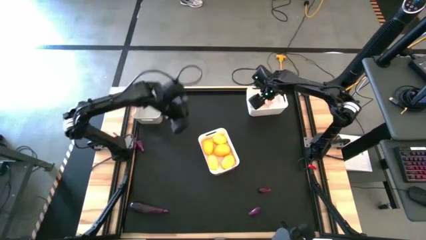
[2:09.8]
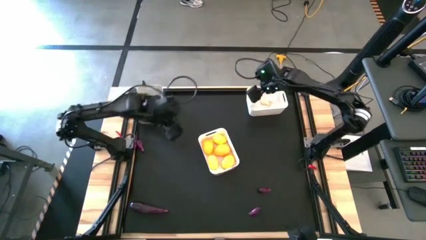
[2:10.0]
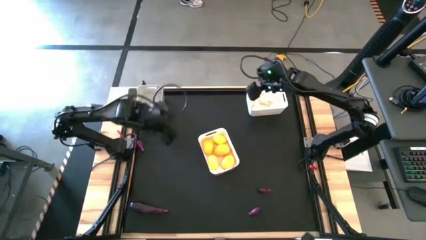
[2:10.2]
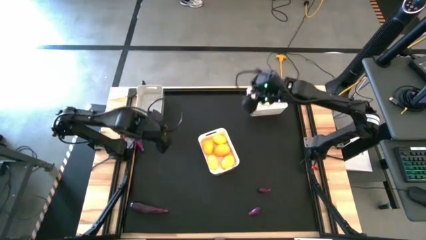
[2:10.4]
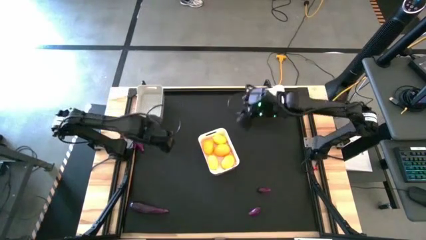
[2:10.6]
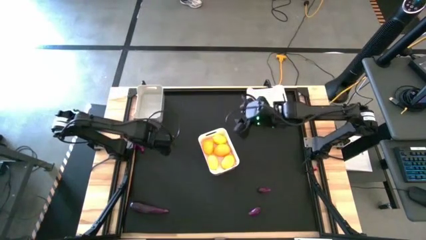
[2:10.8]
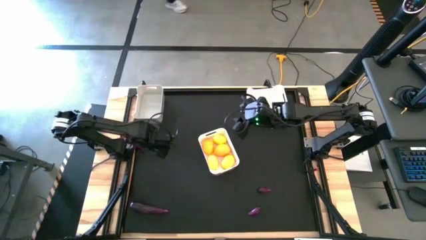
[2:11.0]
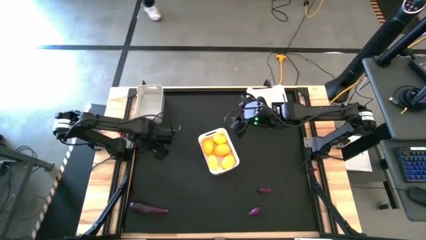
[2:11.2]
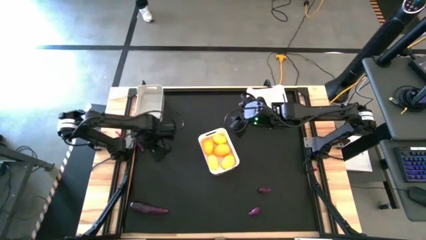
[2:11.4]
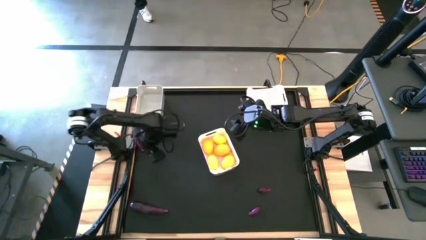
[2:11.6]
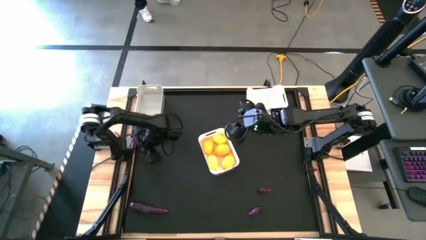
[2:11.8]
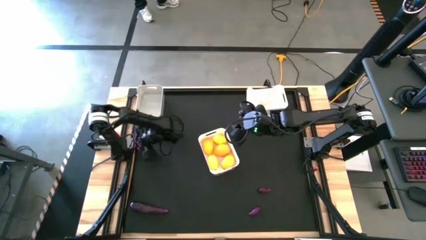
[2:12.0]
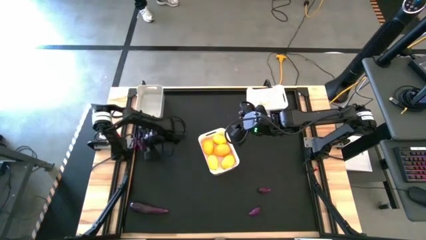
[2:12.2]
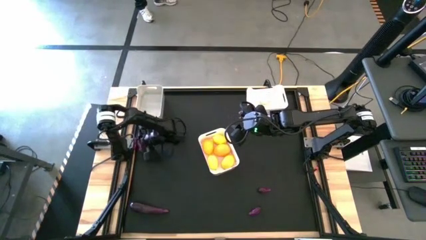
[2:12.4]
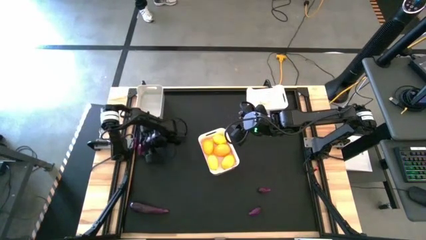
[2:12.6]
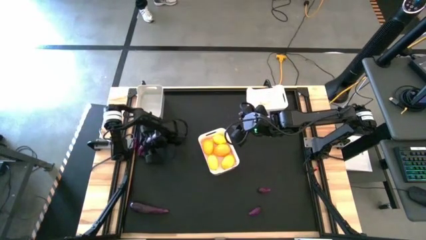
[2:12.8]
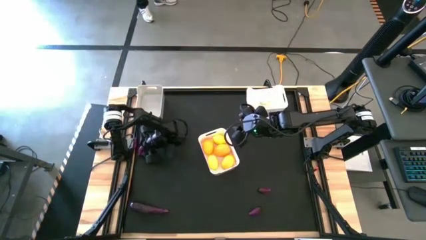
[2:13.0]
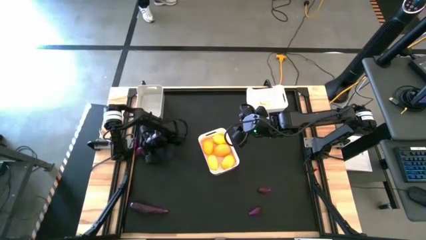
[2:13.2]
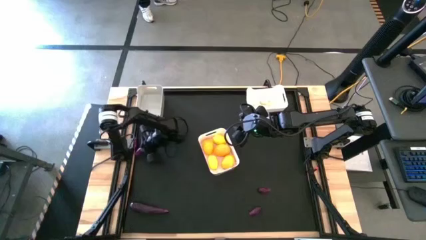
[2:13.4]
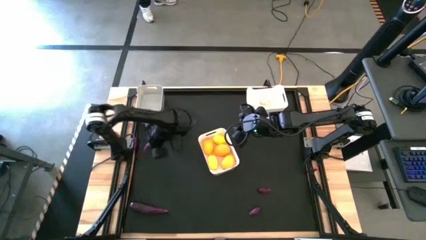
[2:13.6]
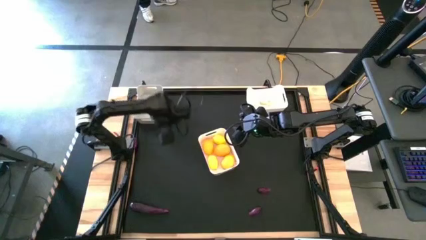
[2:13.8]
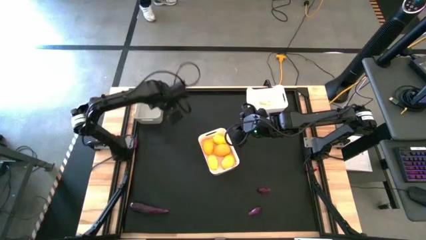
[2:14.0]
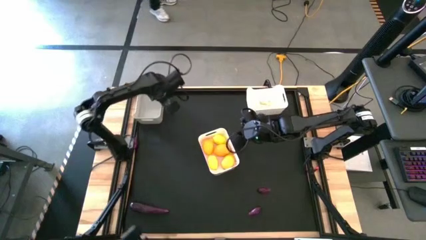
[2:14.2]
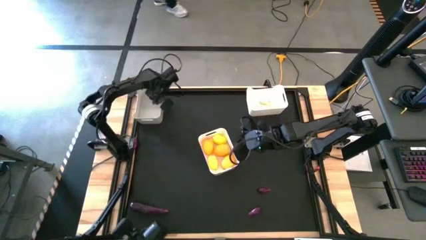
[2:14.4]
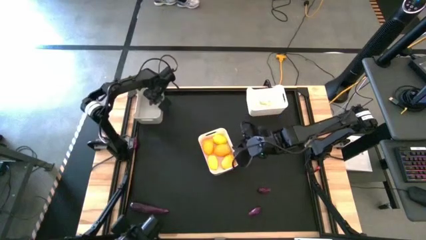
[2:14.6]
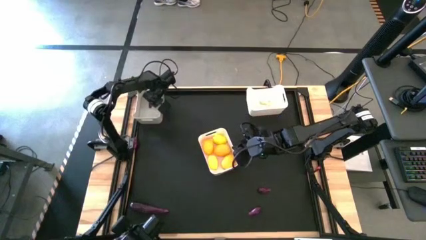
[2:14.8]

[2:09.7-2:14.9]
Task: Sort produce into baskets
Put the eggplant into the gray bin

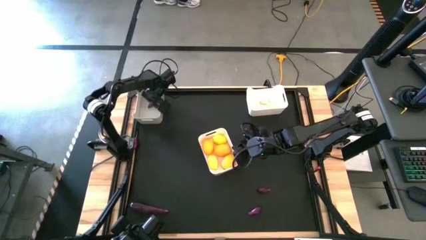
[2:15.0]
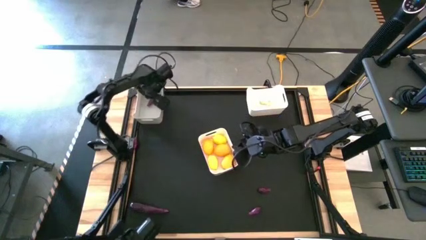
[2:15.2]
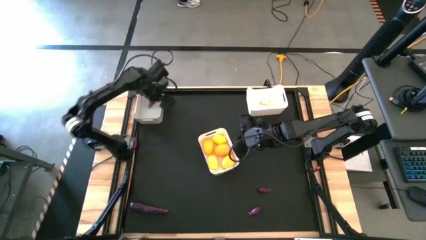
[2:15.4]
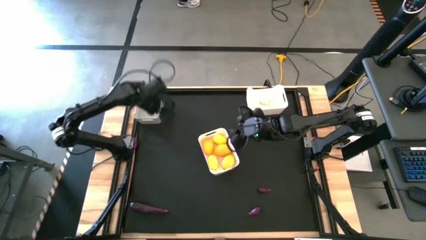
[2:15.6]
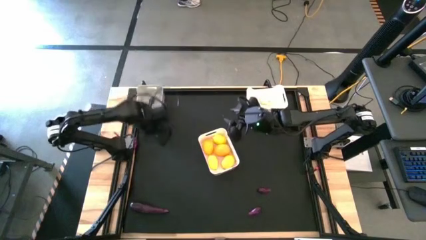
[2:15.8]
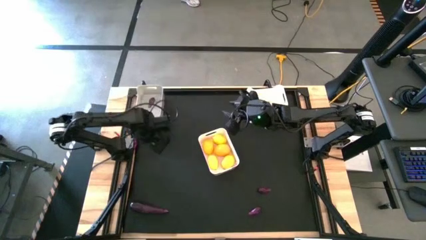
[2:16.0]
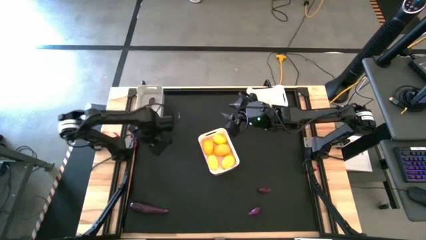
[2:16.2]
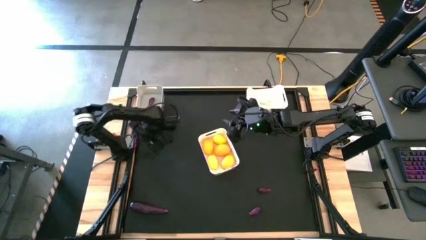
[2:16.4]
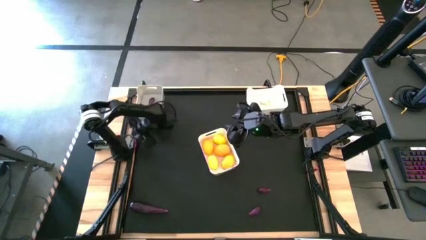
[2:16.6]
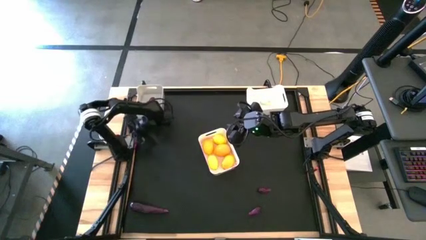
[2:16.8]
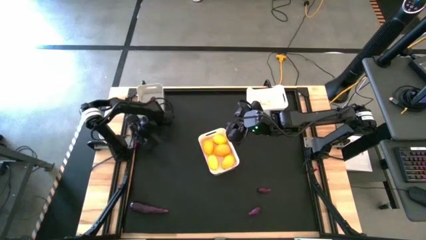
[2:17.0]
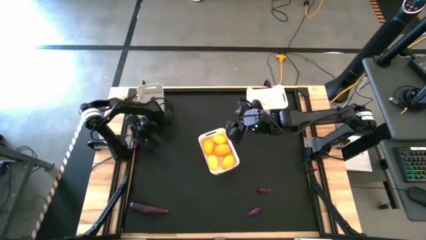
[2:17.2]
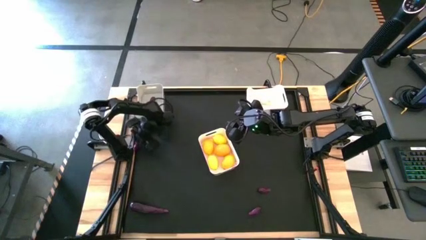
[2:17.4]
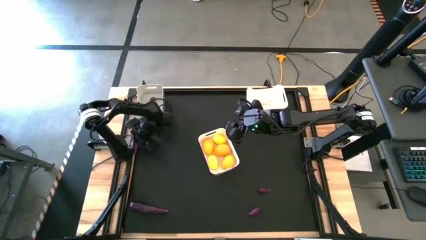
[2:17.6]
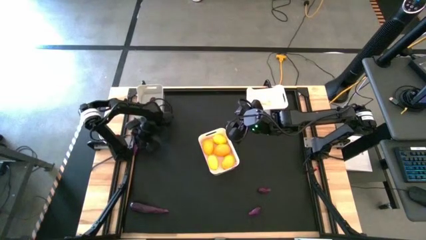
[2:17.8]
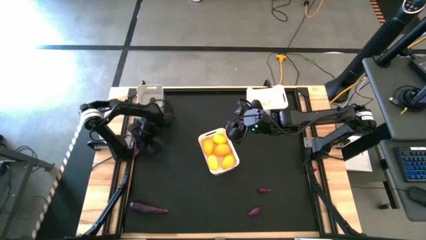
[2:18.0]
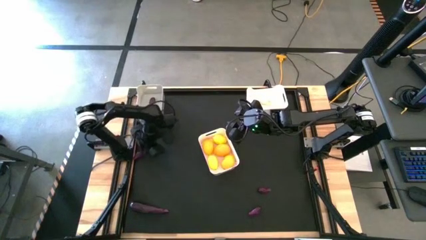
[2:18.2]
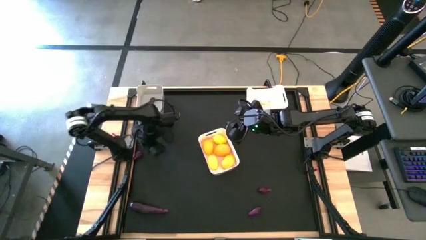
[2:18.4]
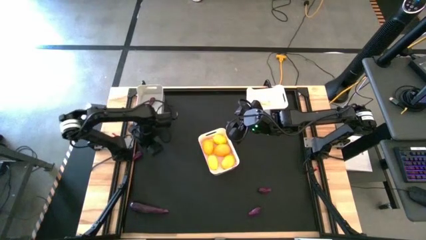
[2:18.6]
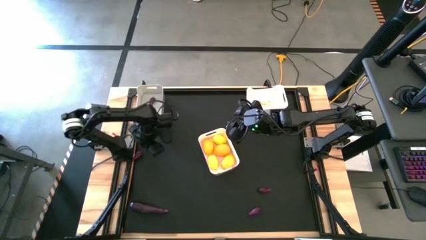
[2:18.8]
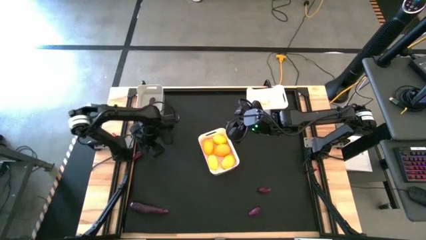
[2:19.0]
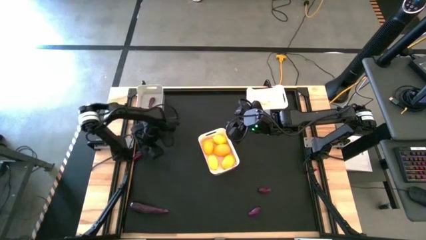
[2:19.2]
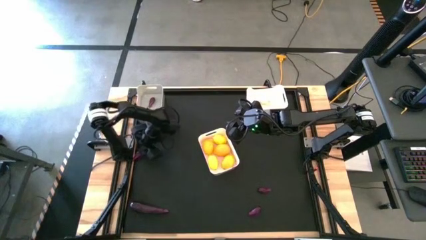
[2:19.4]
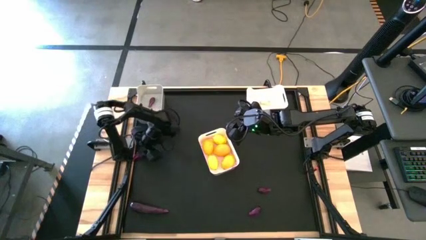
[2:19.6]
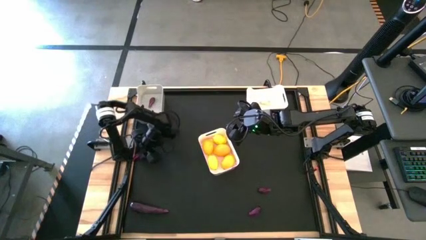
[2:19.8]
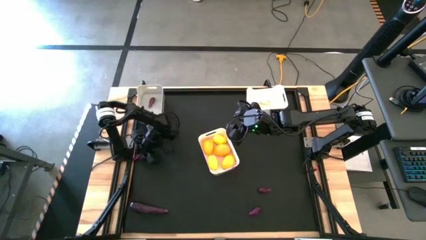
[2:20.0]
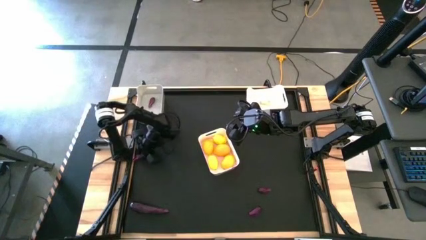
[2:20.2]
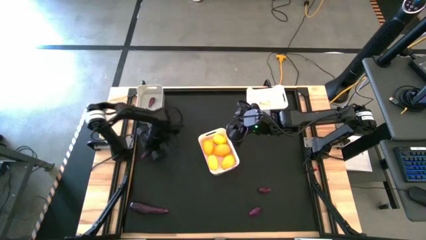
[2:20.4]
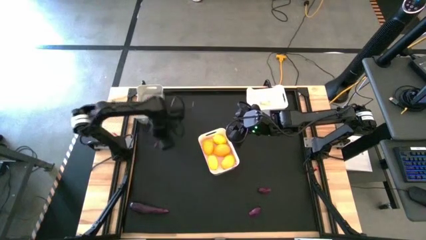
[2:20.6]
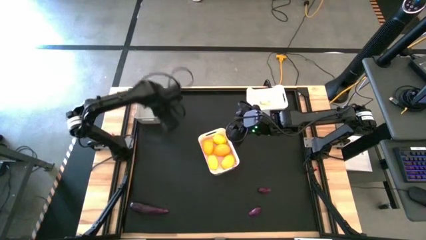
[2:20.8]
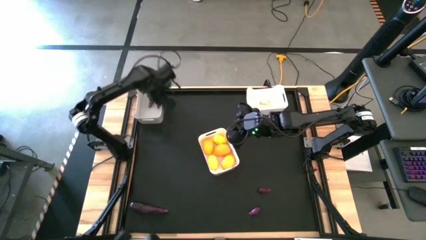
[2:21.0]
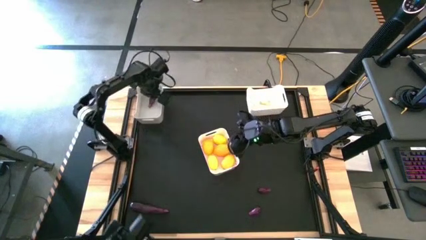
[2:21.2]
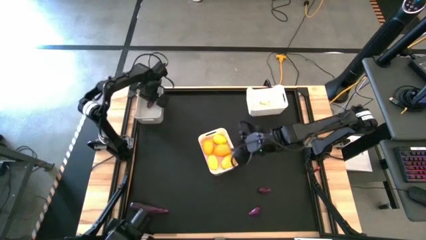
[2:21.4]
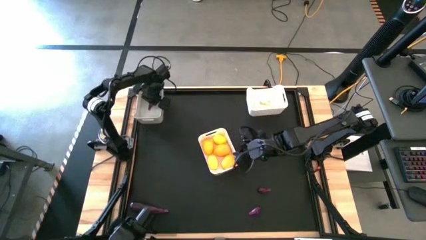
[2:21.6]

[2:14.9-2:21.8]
Put the eggplant into the gray bin

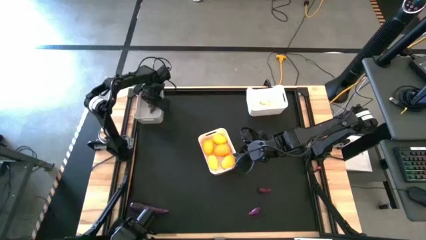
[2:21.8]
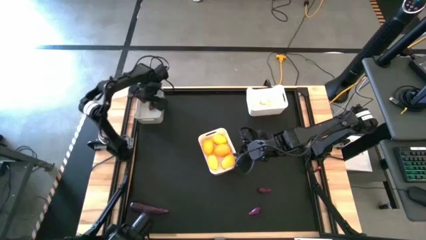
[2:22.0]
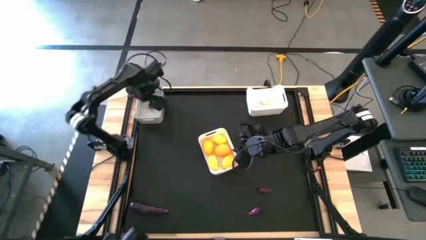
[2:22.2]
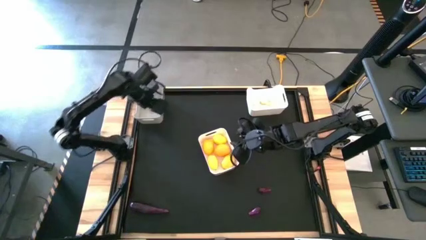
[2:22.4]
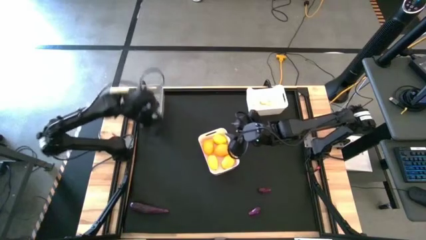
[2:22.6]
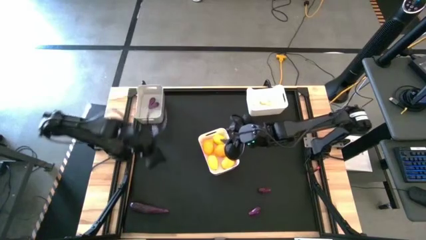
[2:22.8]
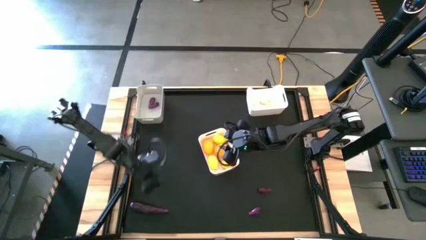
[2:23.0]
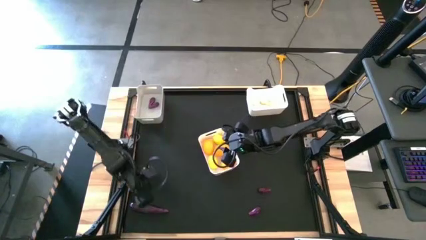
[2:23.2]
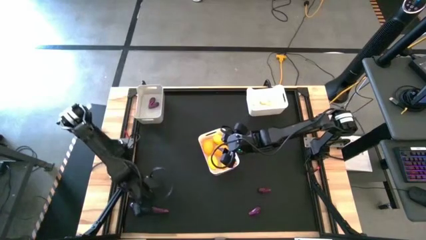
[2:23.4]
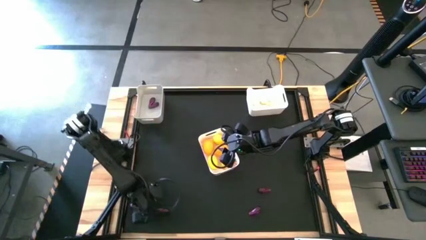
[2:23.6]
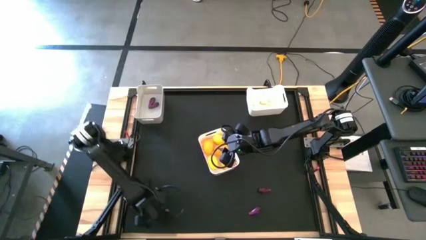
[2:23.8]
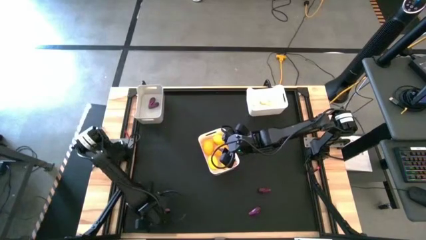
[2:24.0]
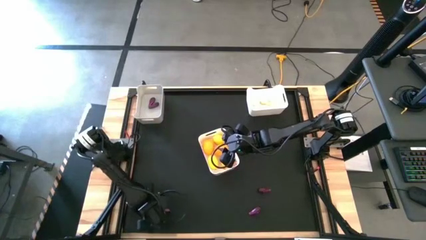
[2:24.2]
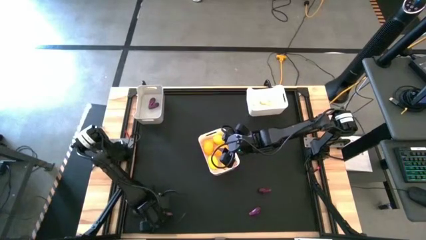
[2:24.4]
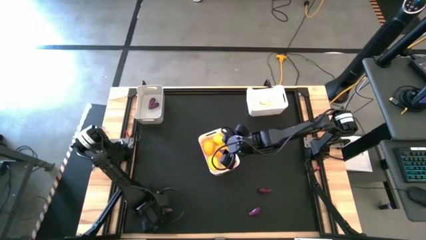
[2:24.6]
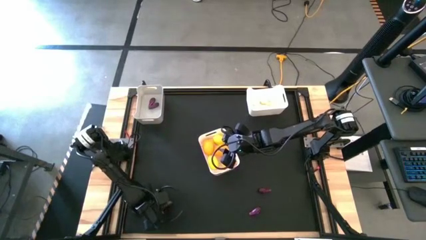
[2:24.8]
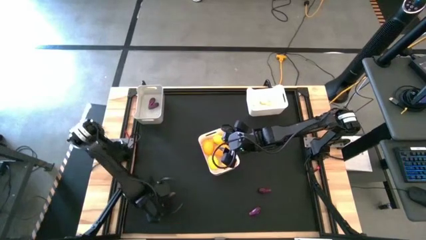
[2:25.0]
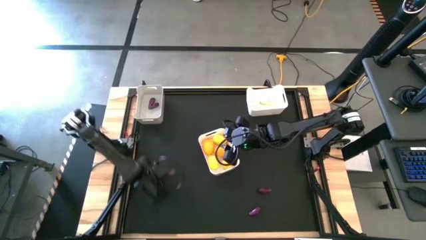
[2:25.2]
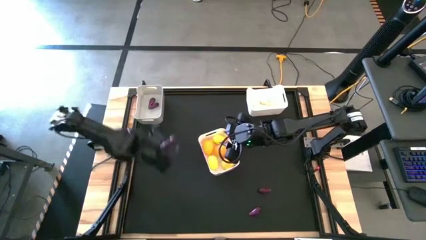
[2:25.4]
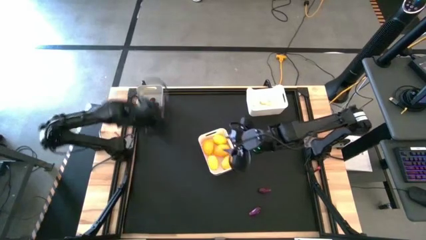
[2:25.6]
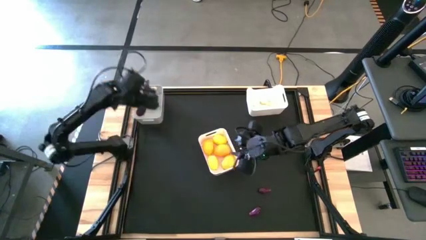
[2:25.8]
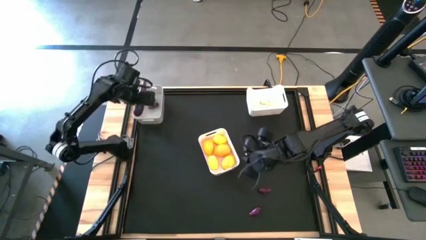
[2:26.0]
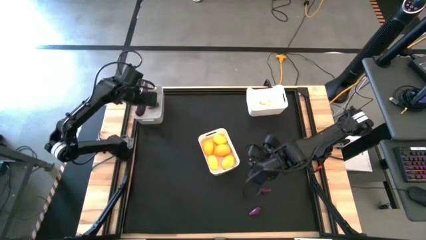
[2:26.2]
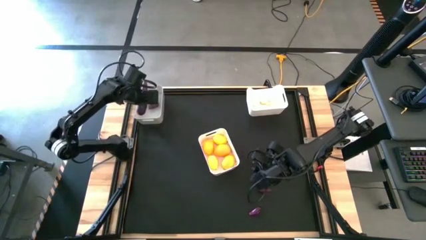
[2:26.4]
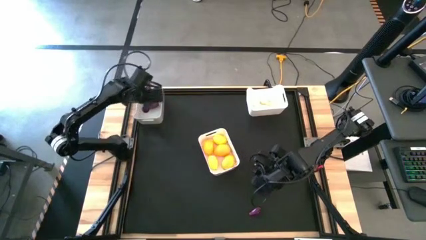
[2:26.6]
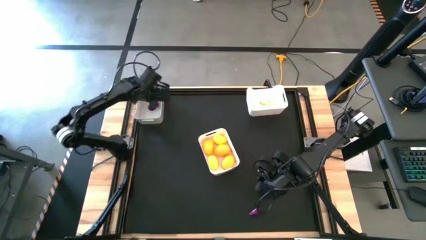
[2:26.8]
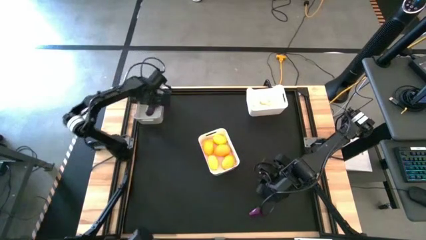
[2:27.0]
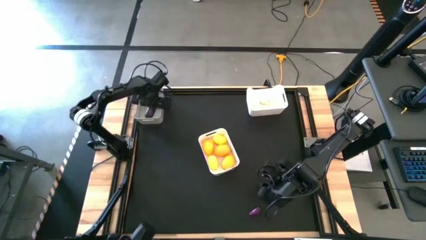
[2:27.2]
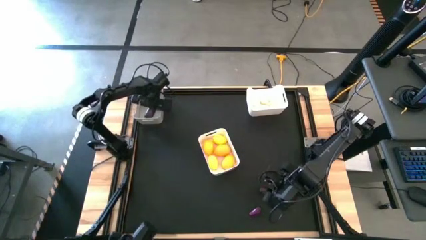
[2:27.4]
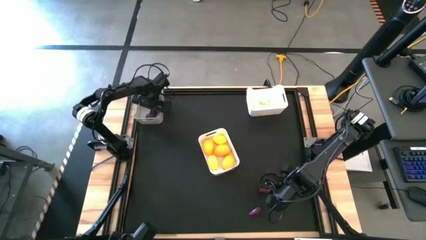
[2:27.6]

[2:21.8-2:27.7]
Put the eggplant into the gray bin
